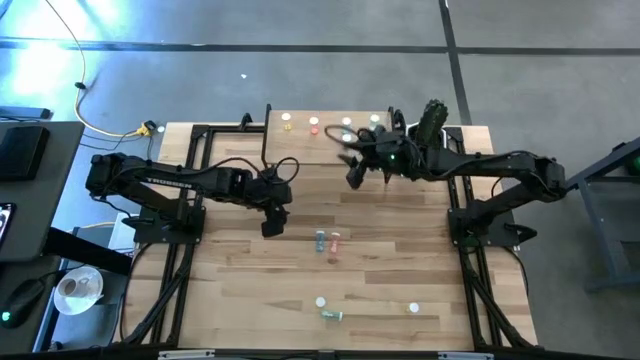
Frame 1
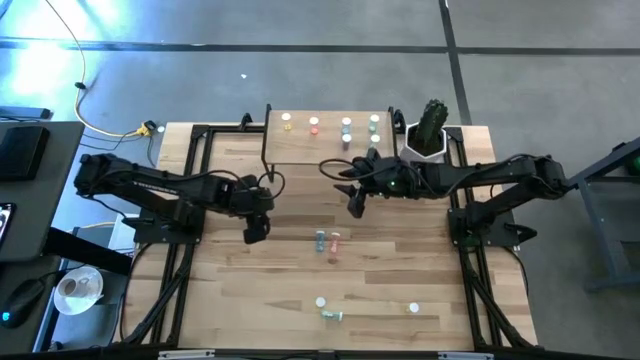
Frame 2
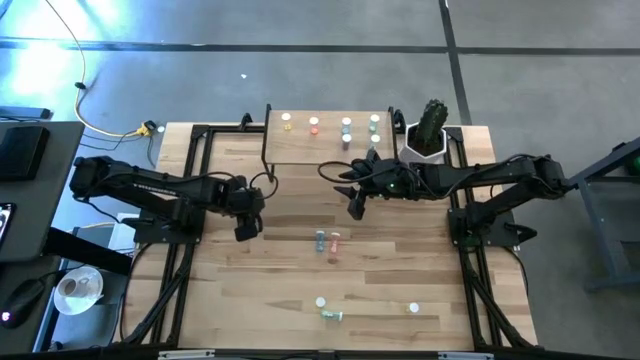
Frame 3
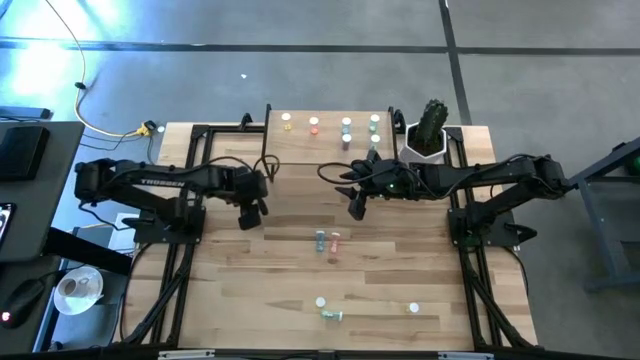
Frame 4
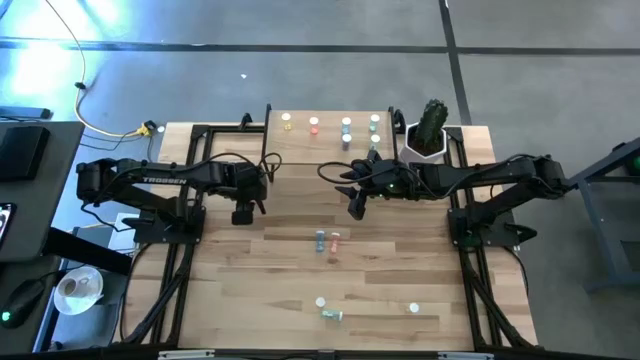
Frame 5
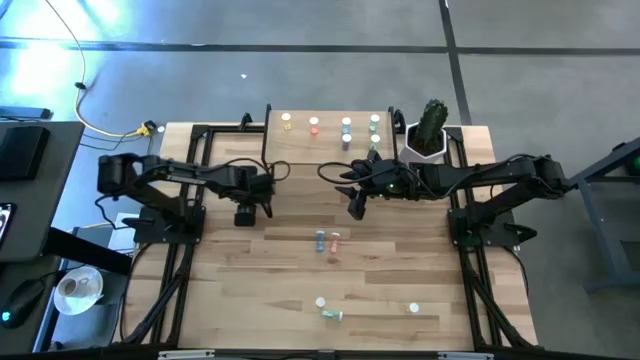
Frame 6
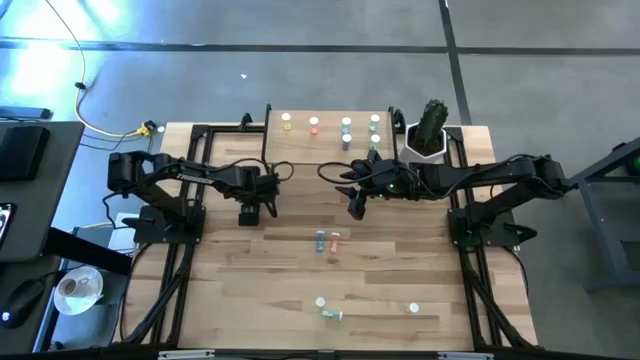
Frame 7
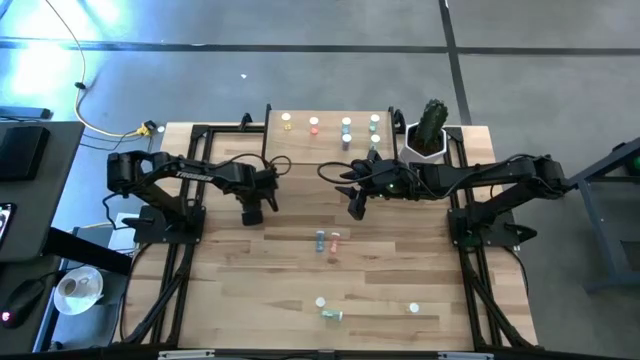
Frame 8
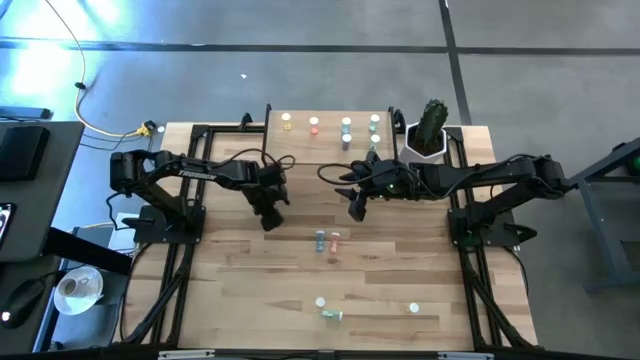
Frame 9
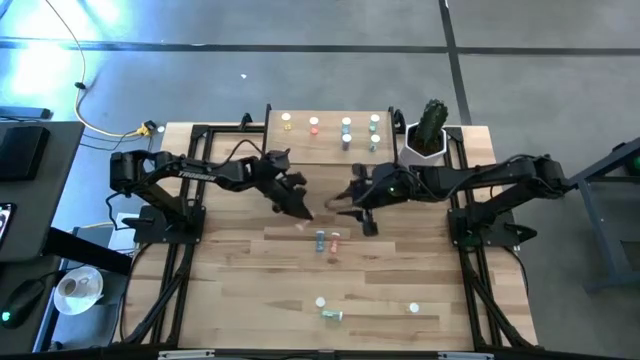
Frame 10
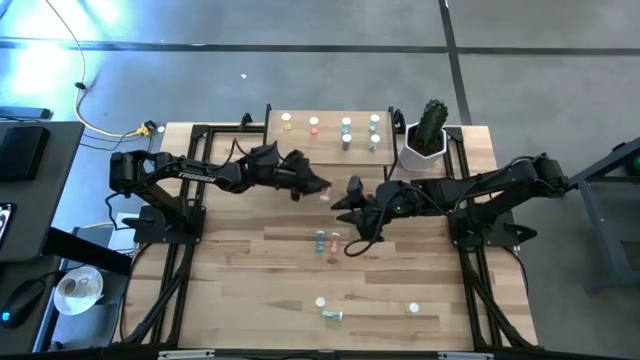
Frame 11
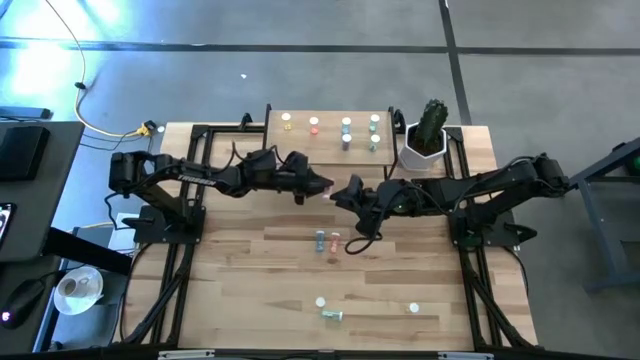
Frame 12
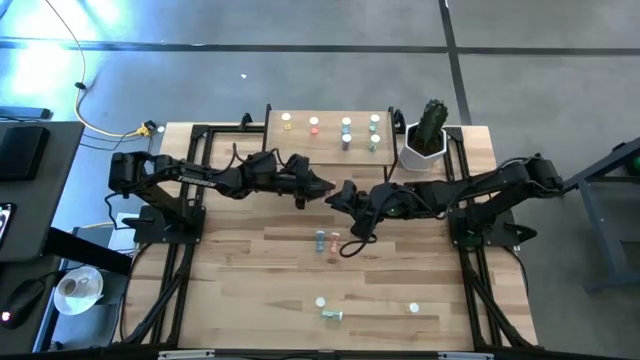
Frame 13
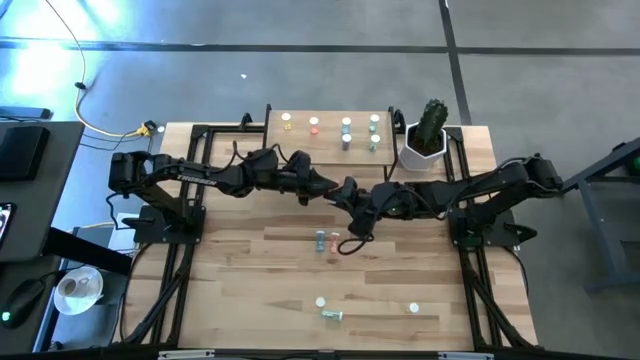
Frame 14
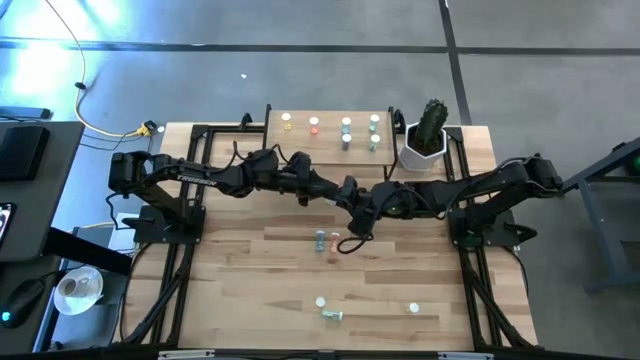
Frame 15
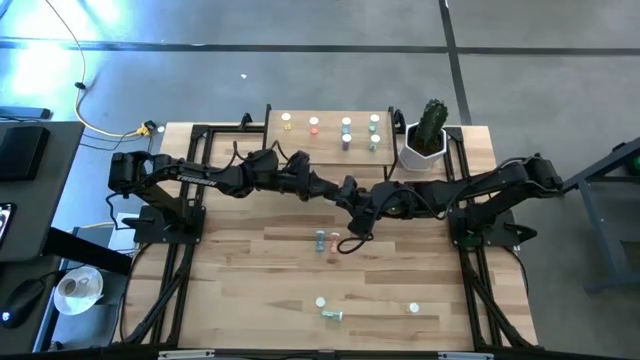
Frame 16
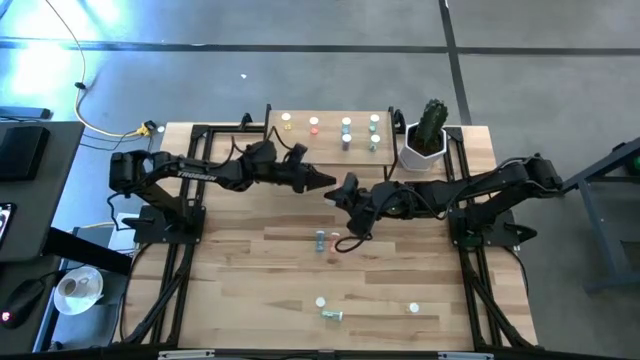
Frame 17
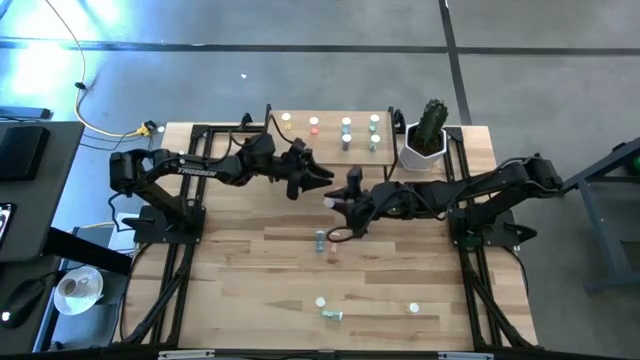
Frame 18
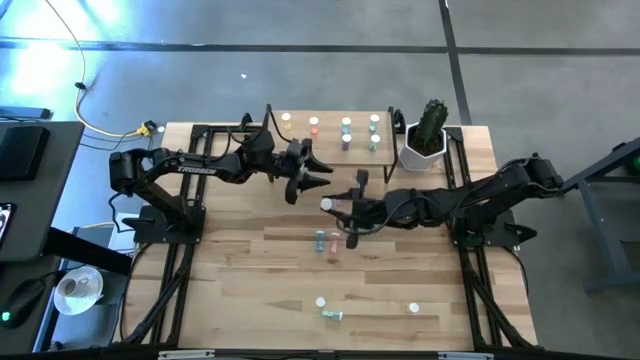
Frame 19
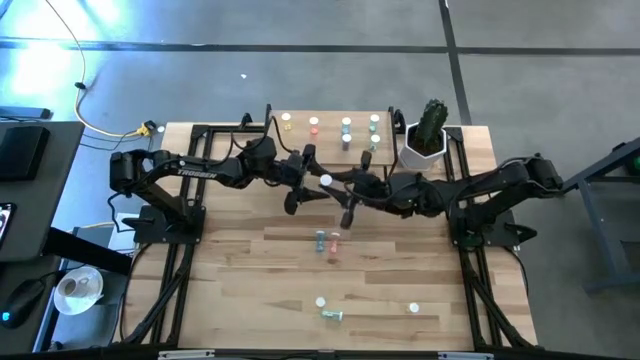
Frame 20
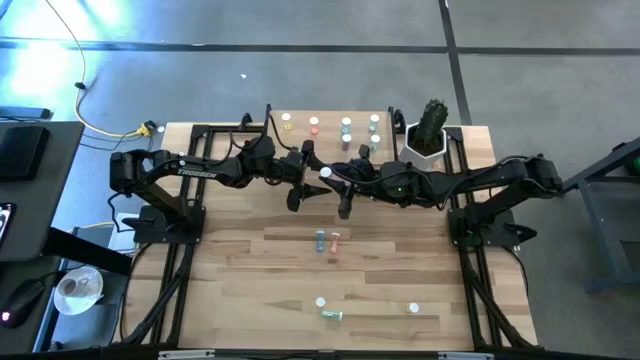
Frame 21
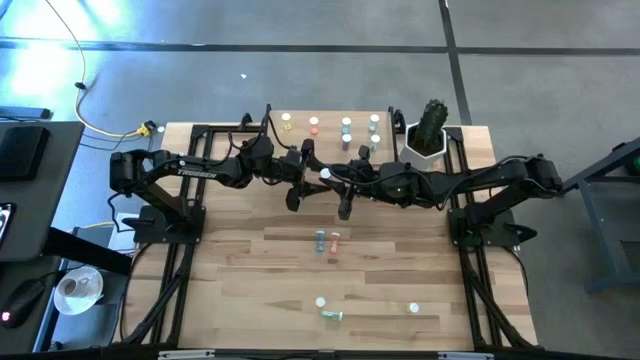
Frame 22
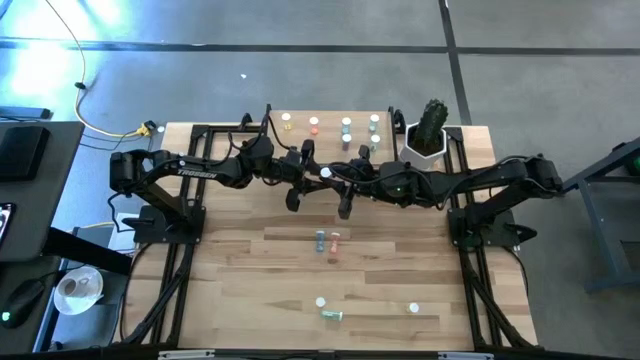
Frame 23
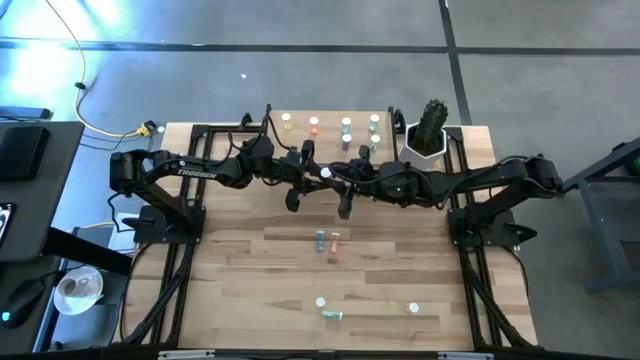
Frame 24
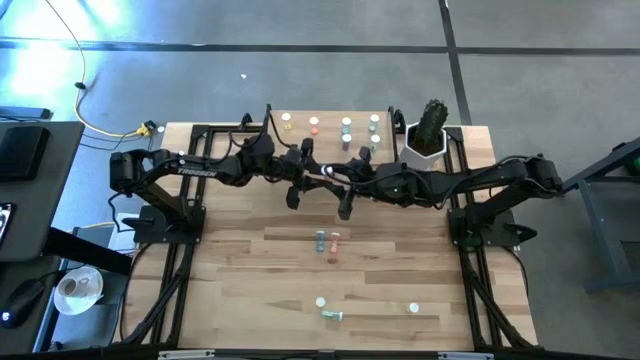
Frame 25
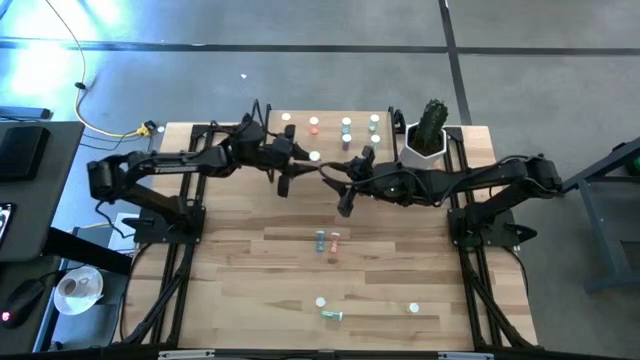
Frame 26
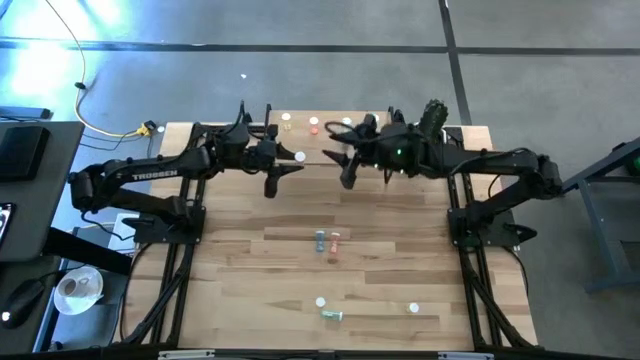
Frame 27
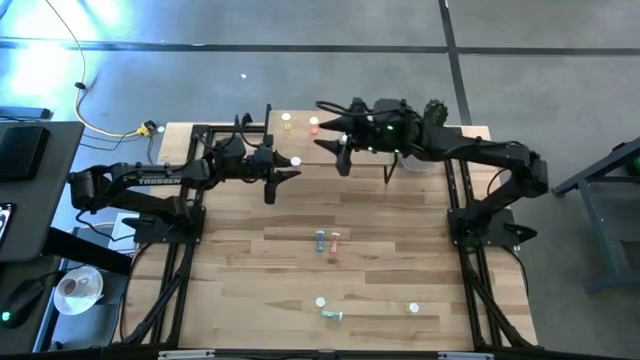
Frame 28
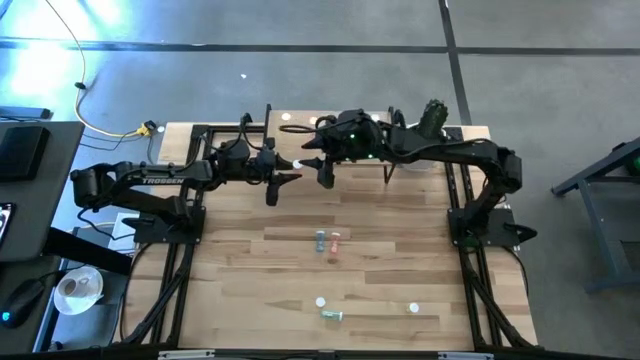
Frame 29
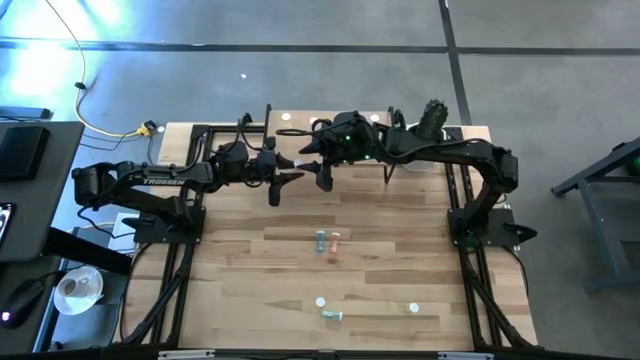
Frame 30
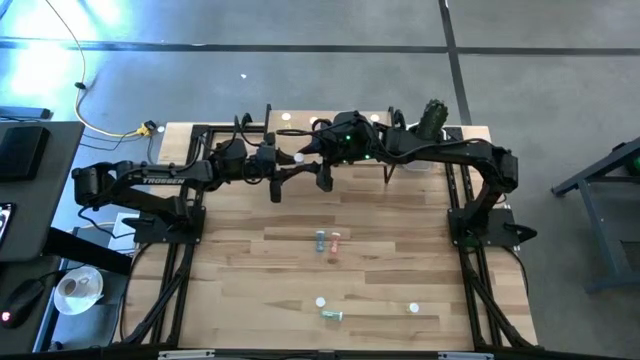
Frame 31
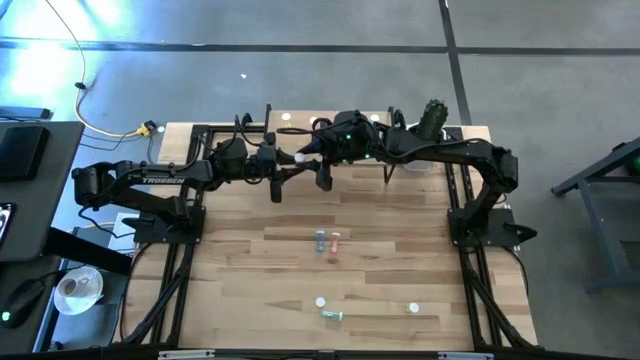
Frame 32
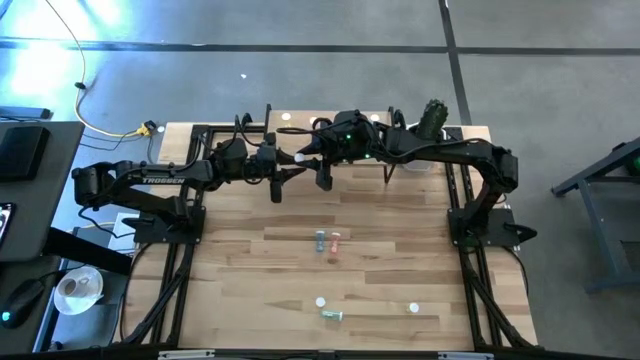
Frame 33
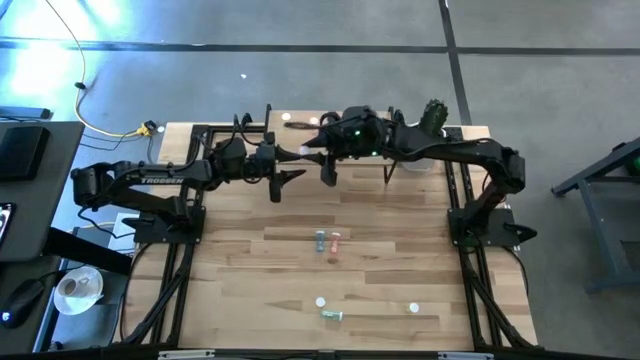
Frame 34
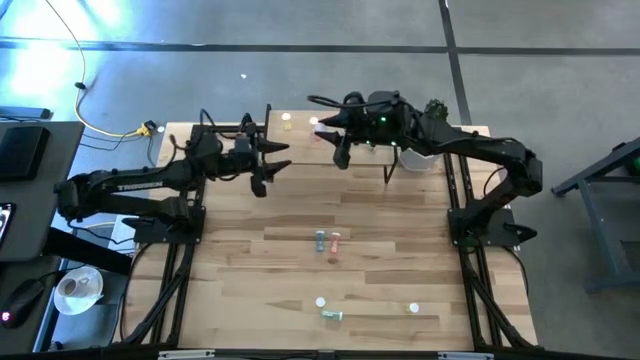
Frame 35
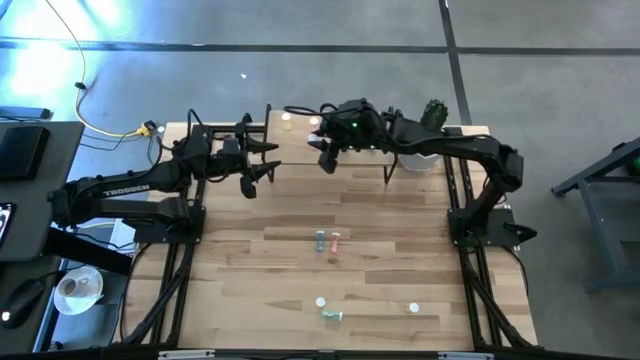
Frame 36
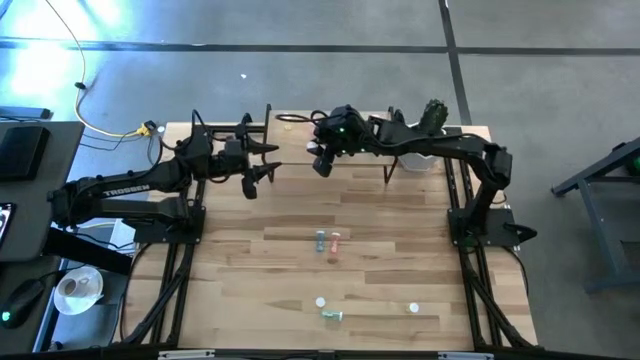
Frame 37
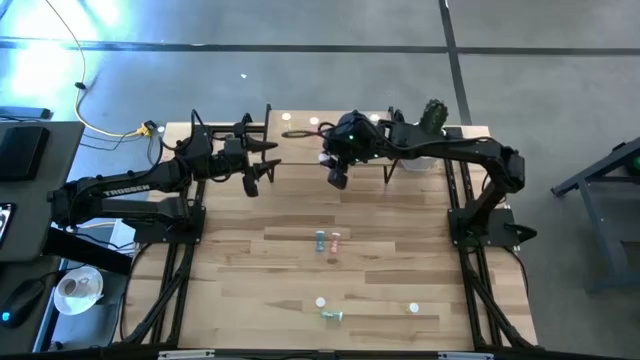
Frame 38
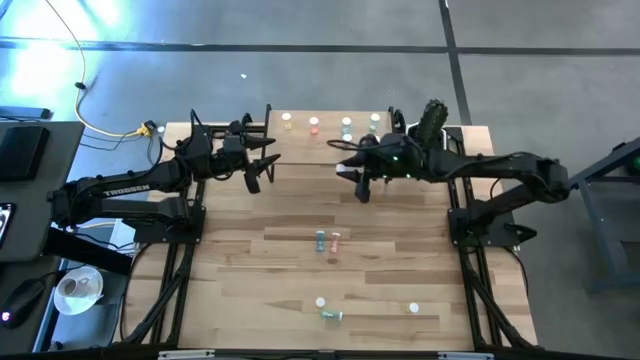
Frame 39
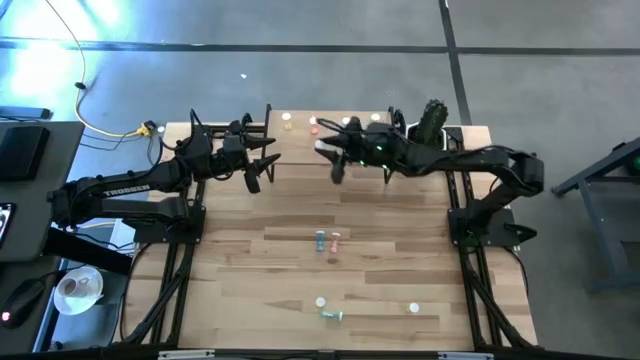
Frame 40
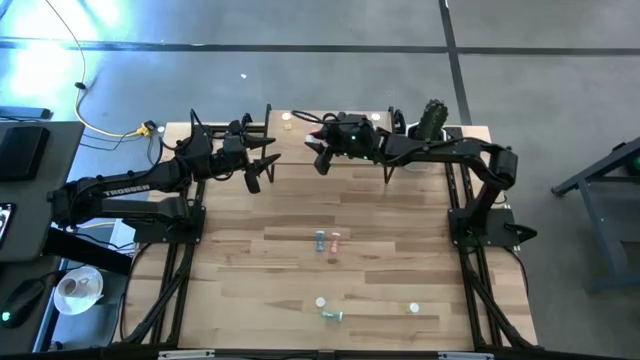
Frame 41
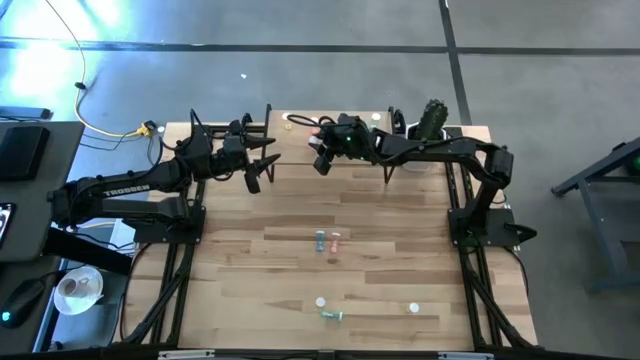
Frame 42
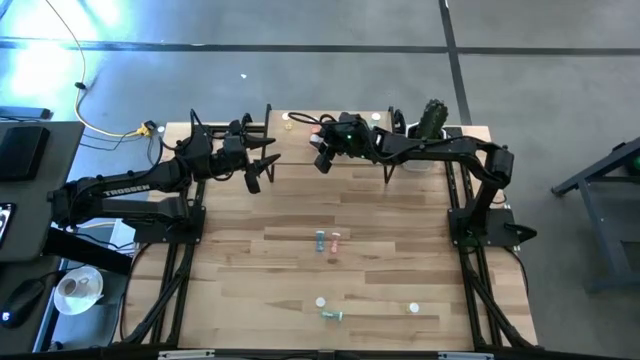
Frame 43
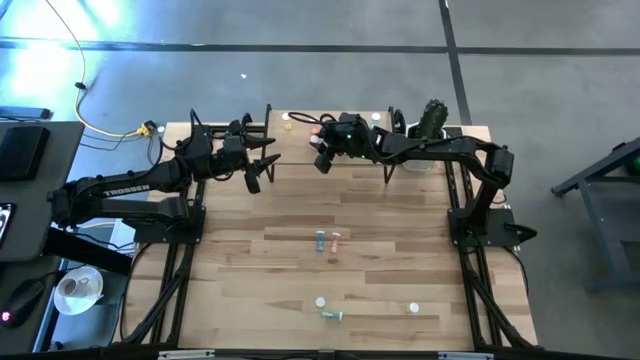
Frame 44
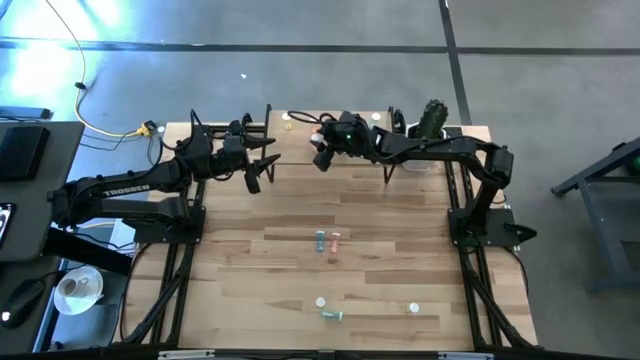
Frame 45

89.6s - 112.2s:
Task: Pick and place medicine bottles onto shelf by color
Put the left pink pill bottle on the shelf aligned with the other pink pill bottle
